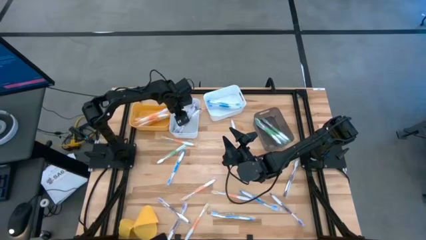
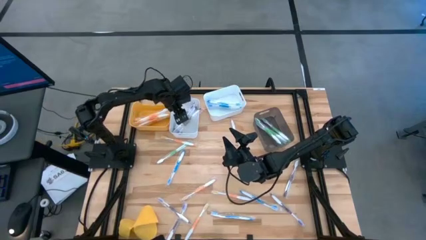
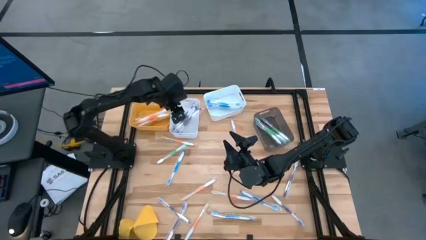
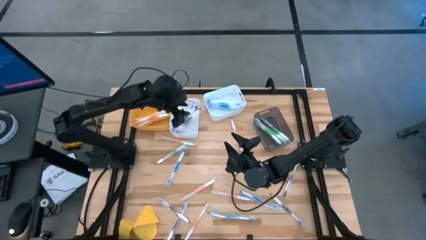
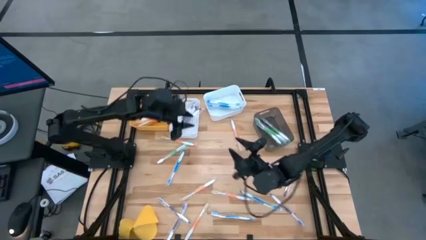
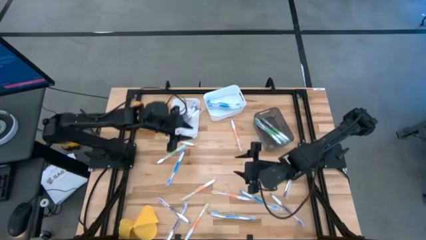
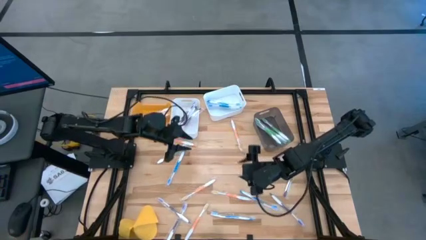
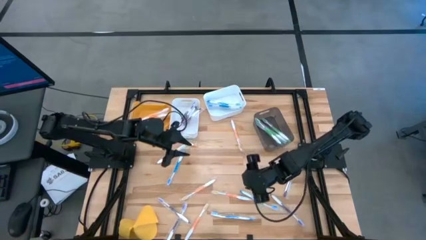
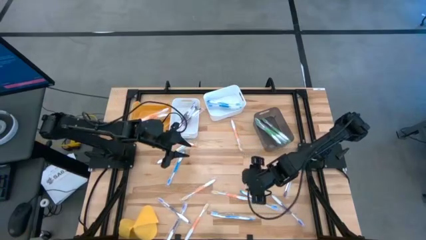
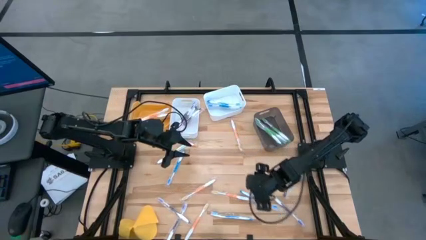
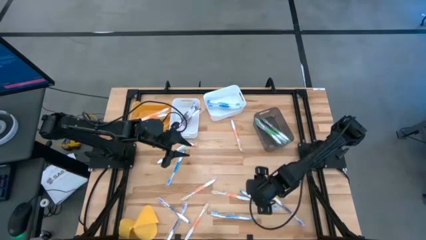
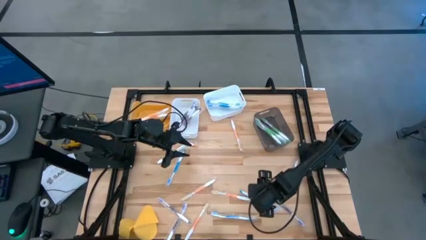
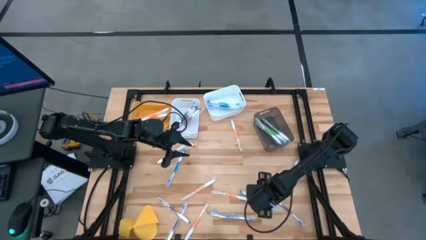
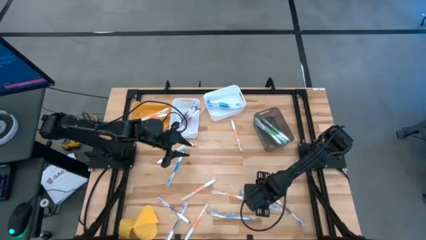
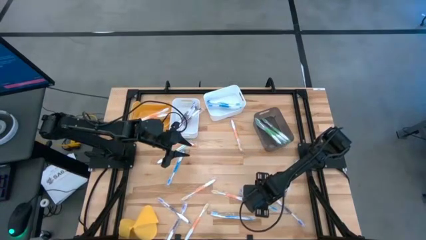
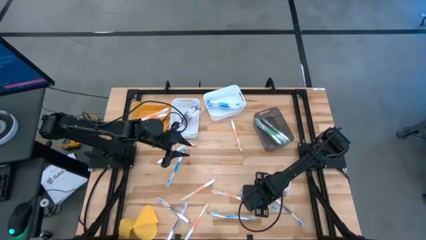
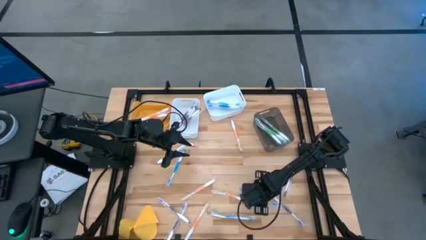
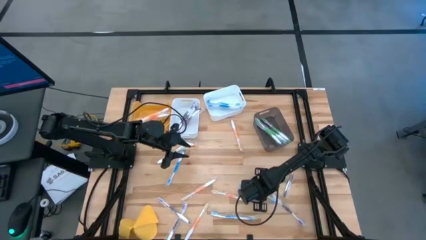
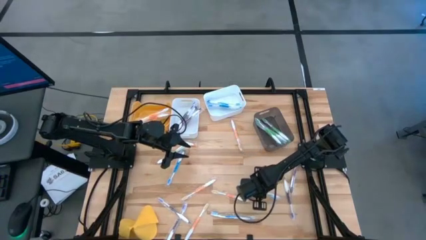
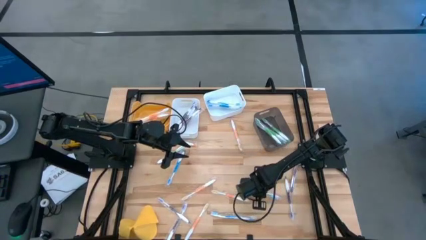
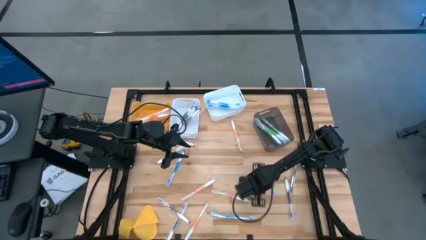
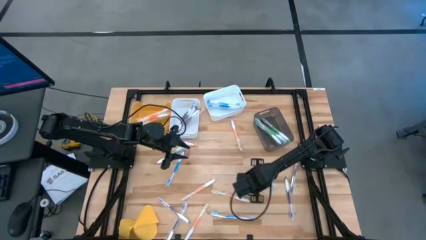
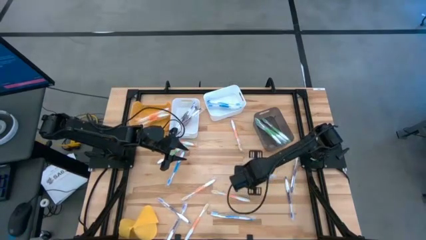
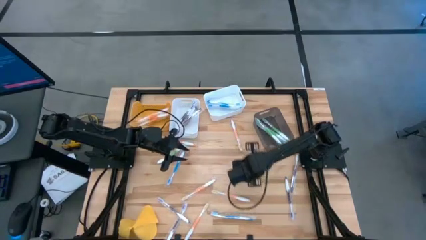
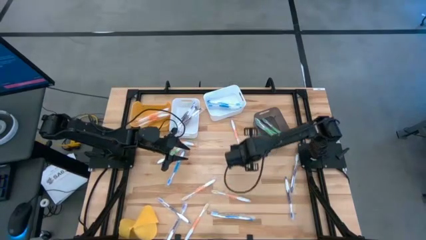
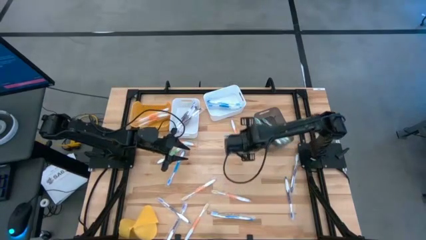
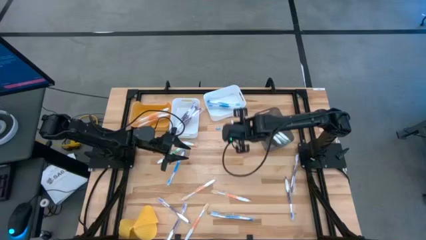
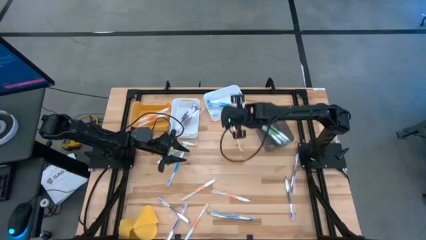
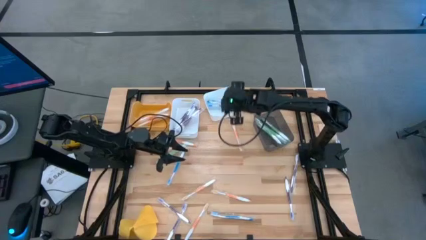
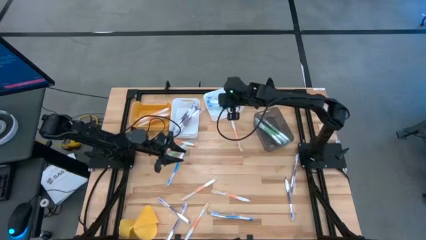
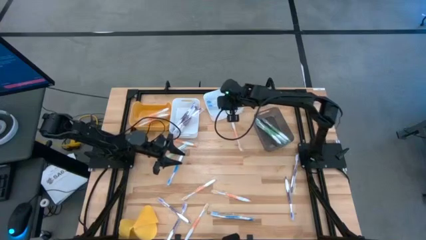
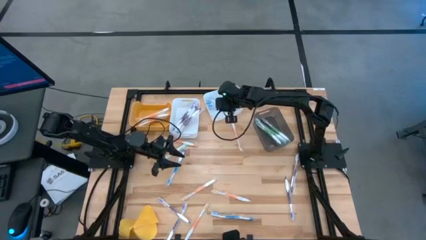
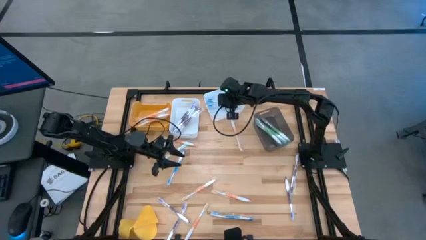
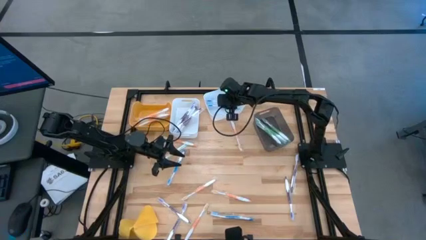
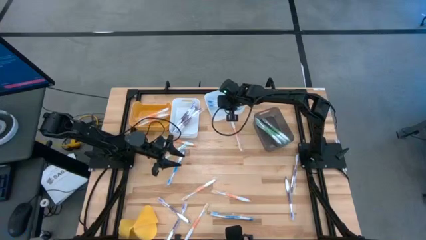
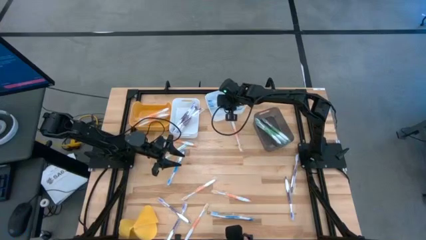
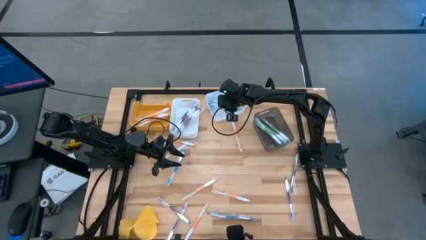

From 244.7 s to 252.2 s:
Task: Pick & Place Toothbrushes
Put the blue toothbrush into the right white bin

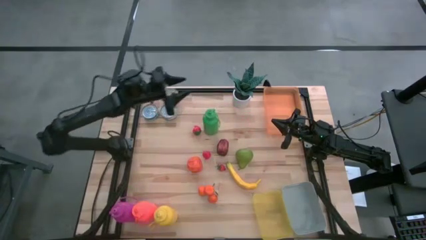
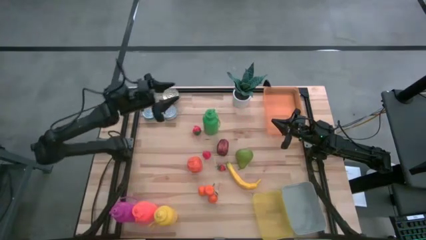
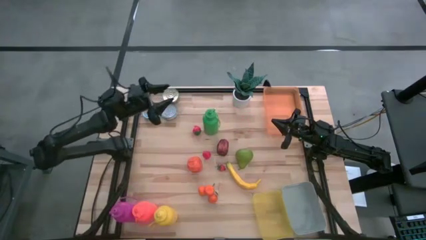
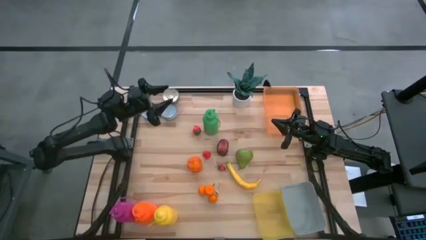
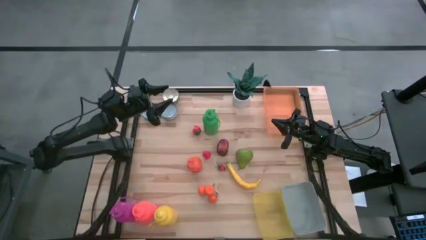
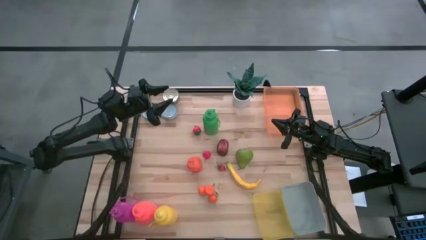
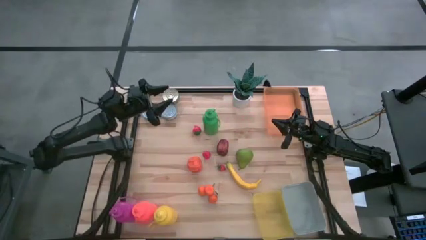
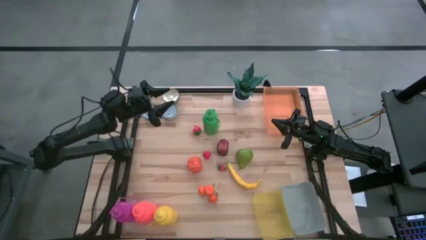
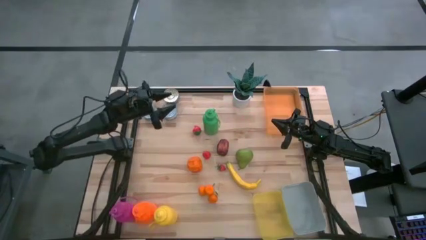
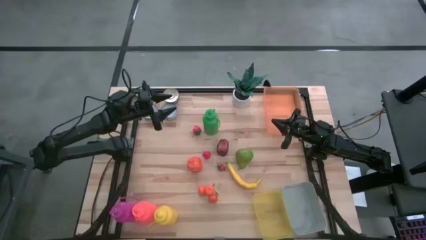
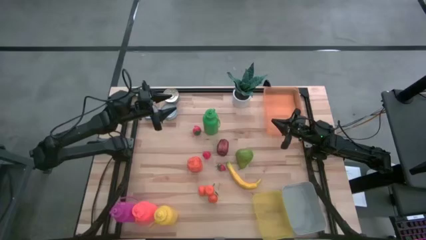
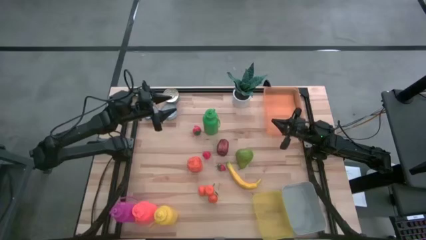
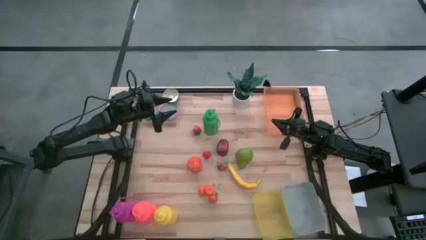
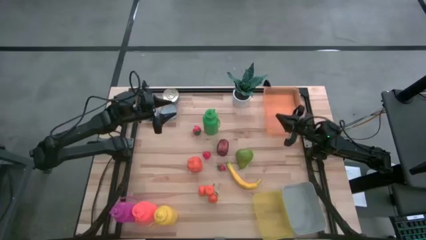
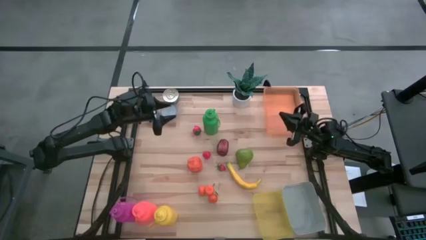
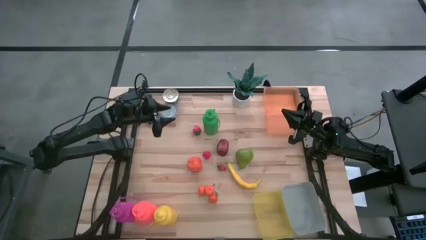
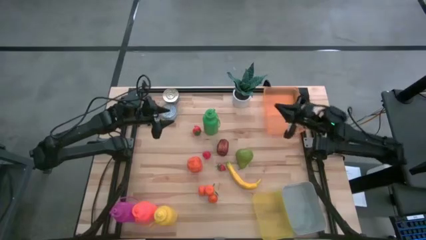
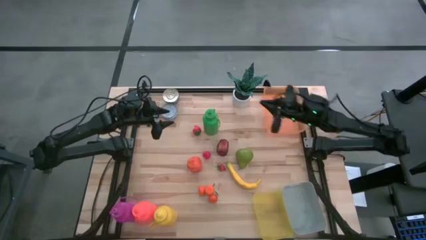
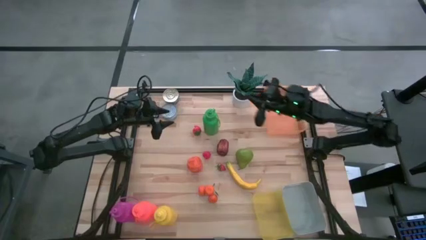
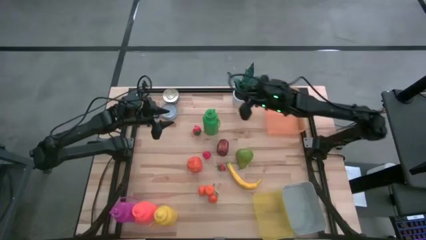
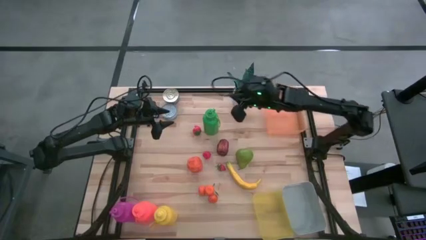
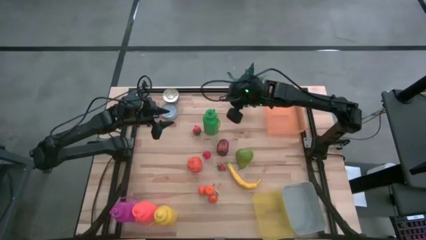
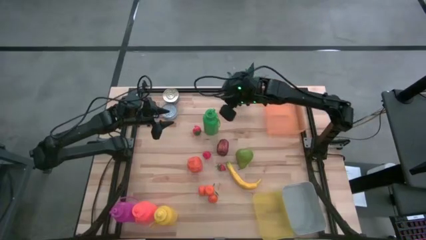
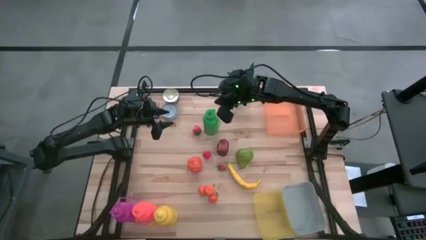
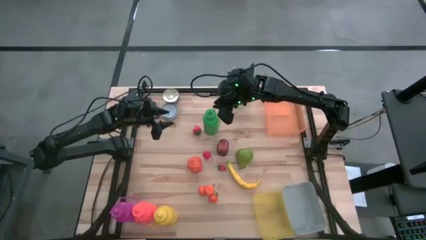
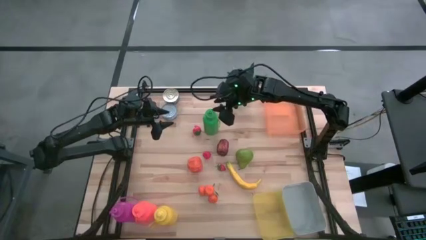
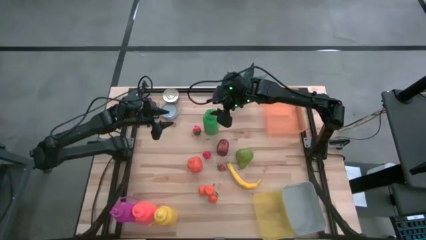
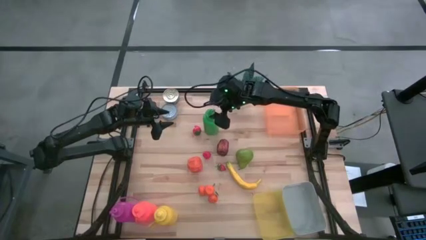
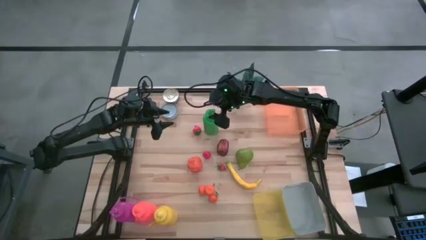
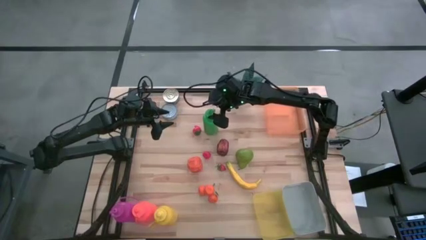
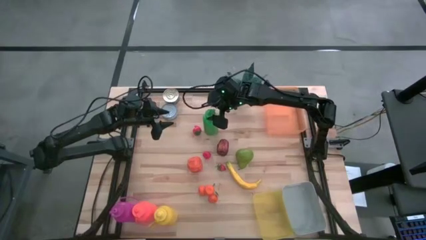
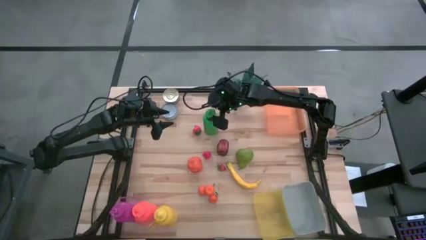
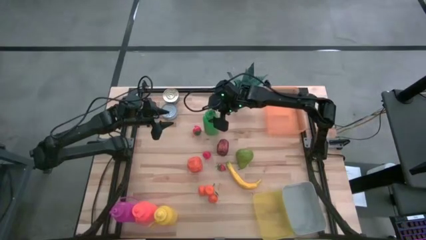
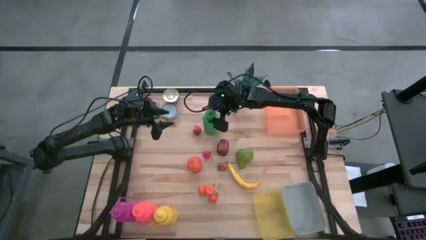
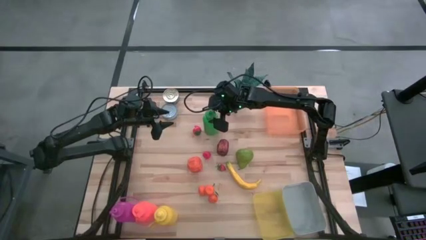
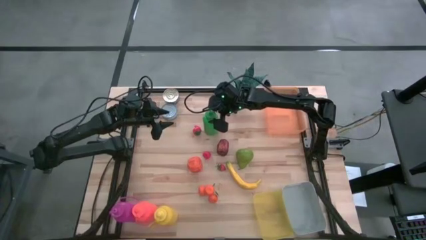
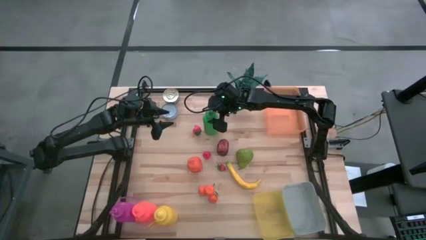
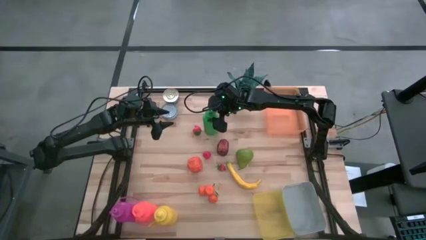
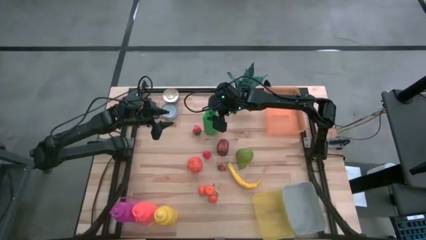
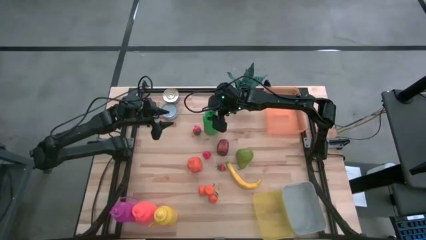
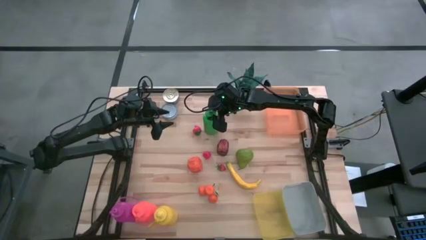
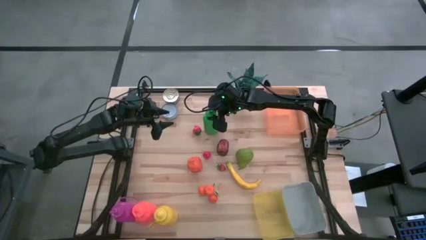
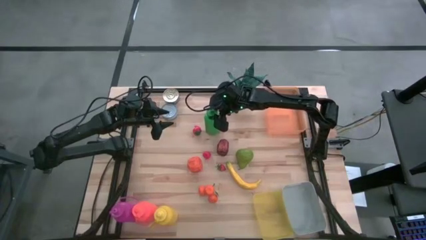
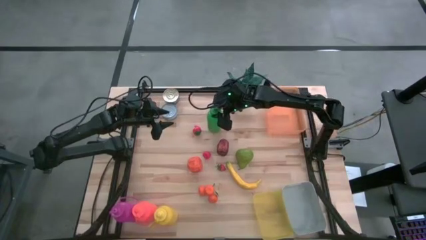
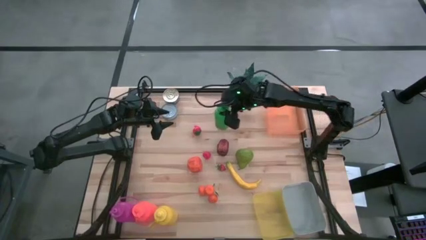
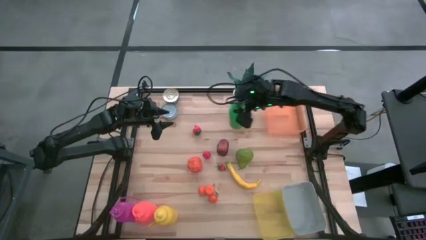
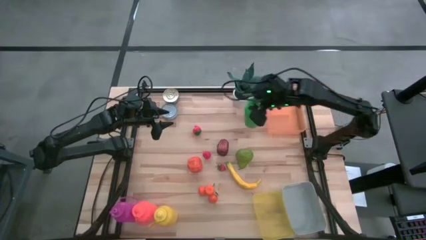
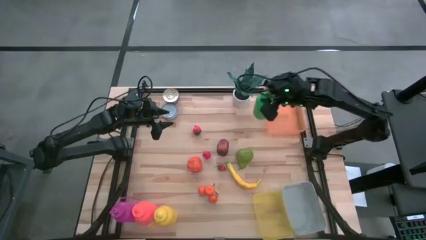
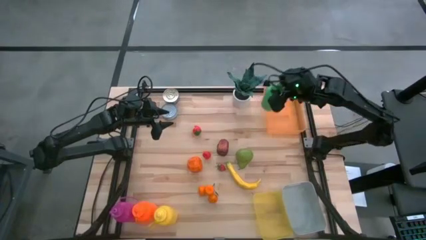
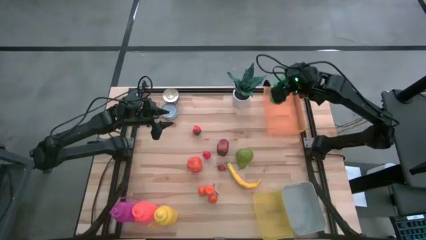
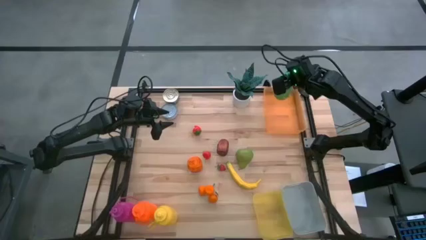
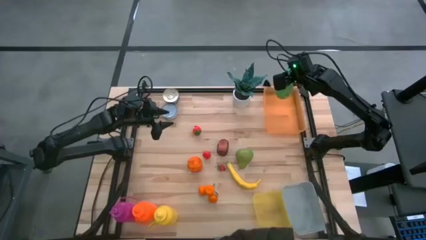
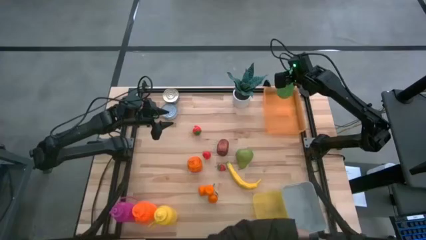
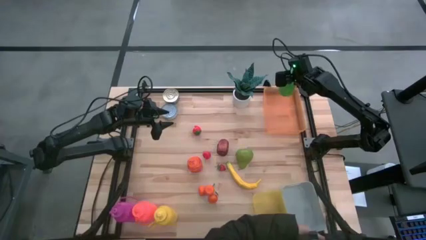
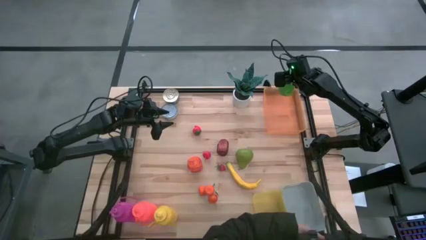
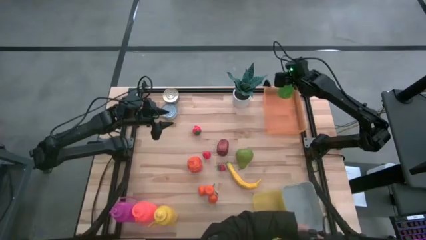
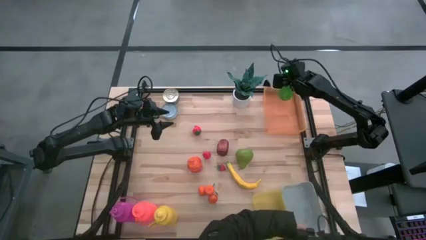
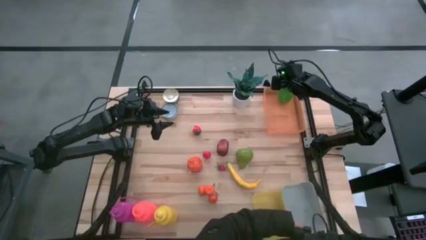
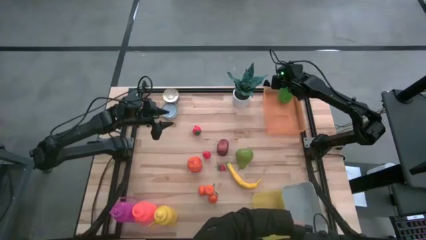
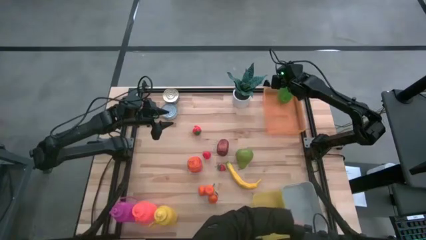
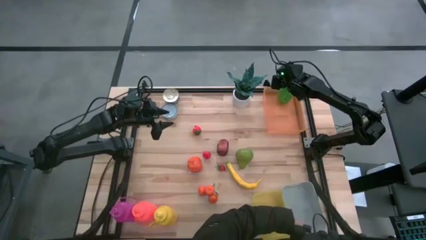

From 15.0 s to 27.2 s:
Task: Pick & Place Food Item
Put the green water bottle into the orange bin
